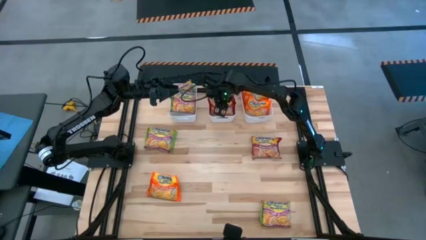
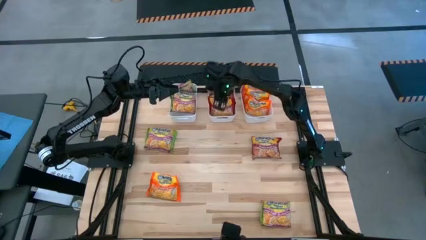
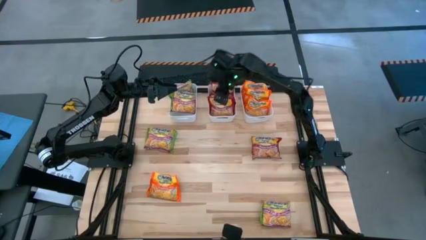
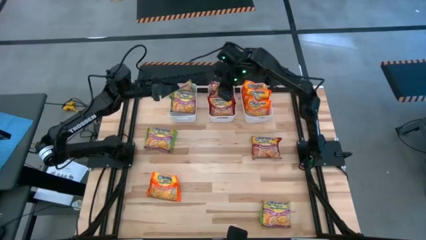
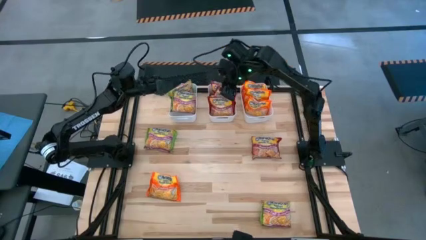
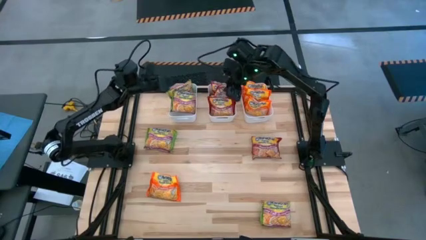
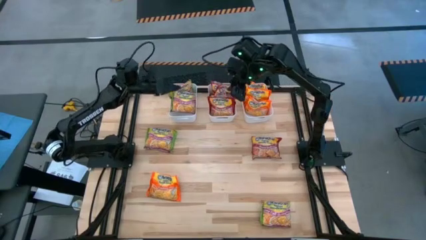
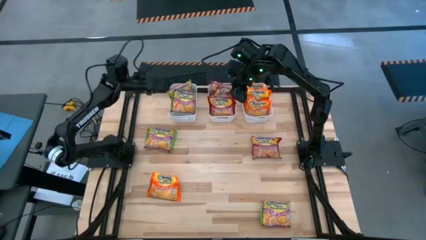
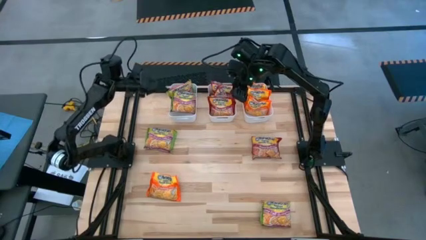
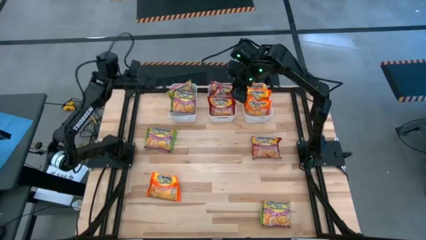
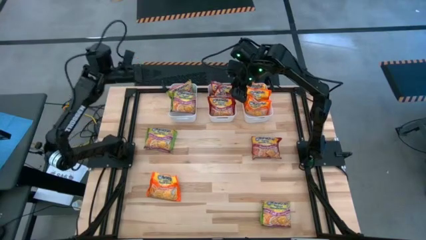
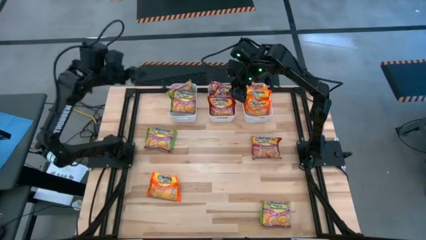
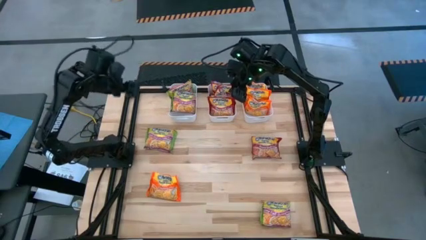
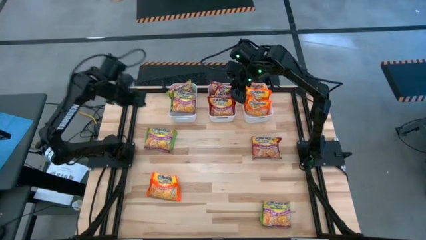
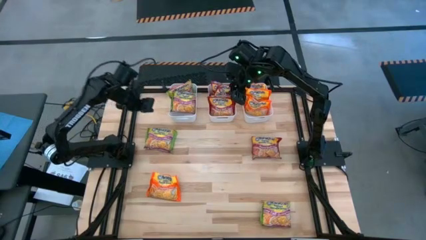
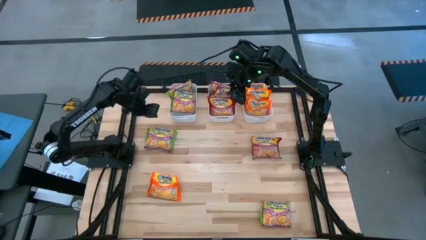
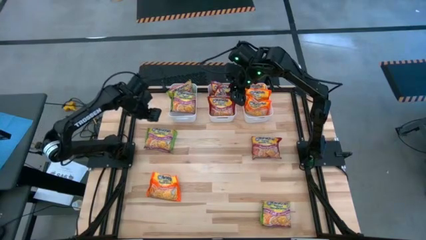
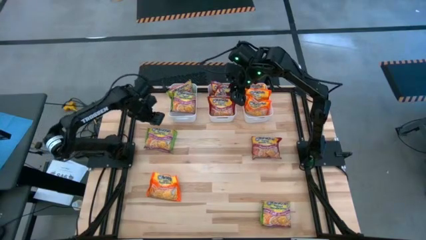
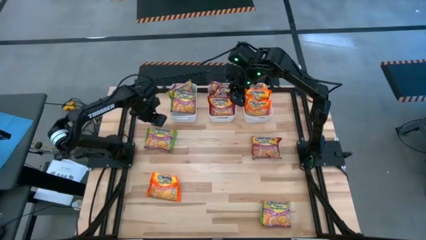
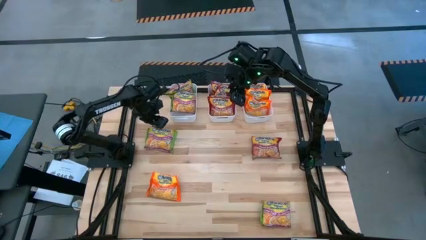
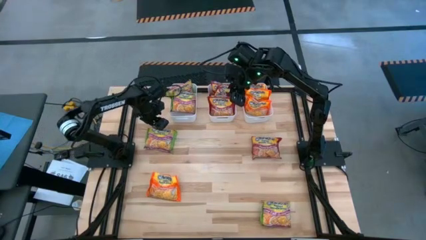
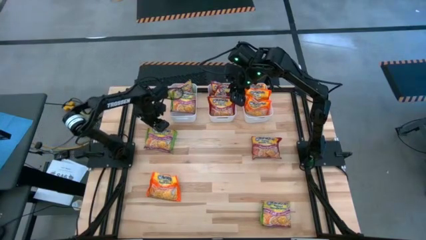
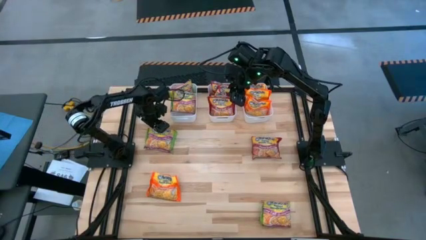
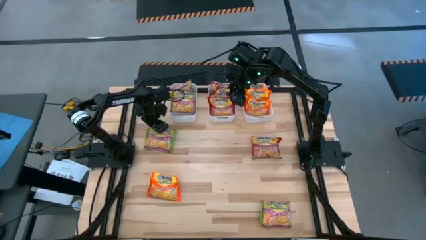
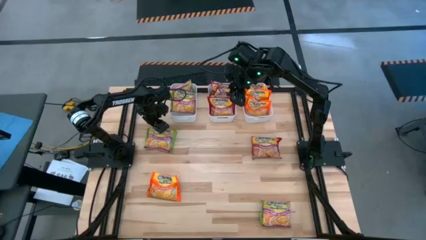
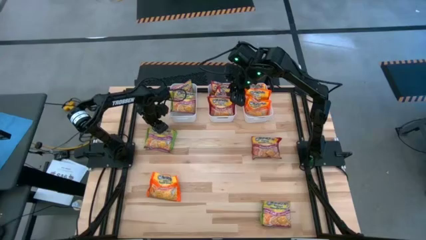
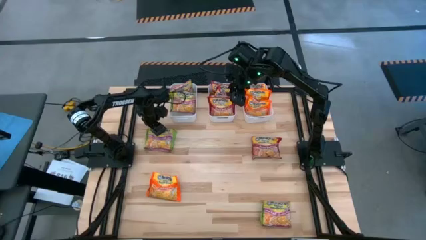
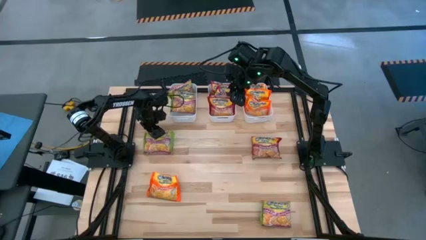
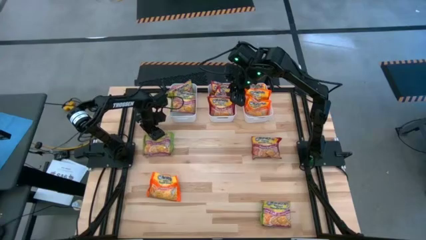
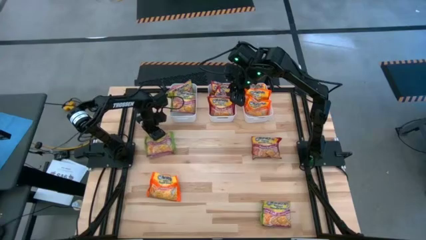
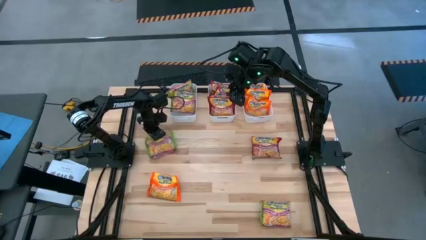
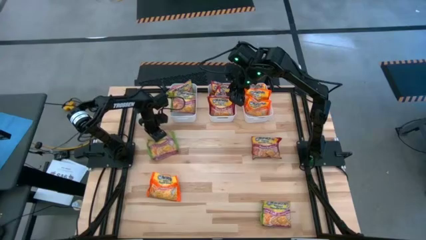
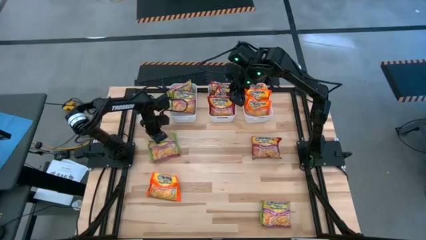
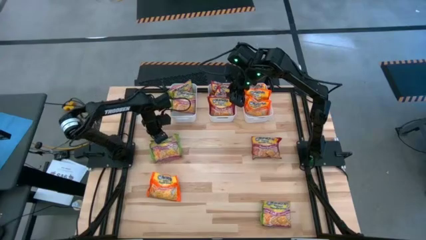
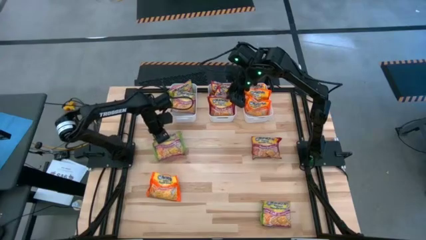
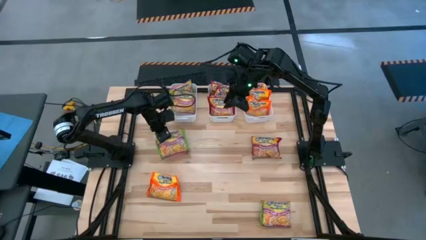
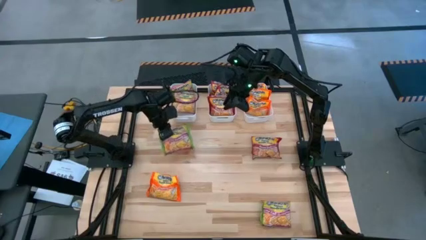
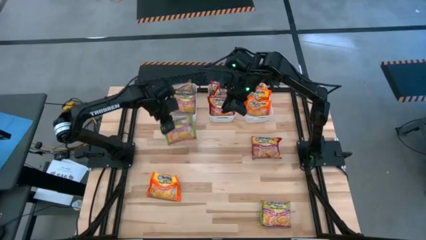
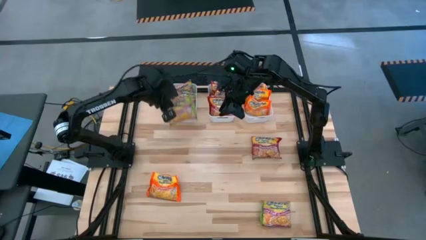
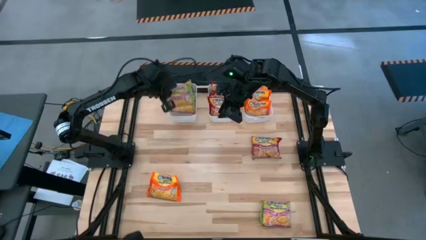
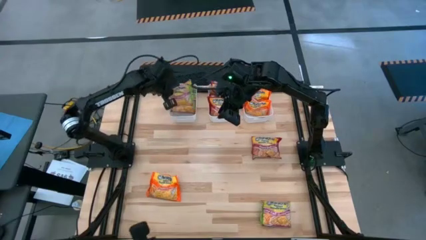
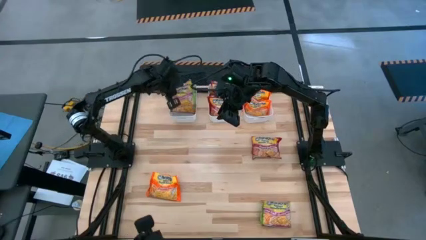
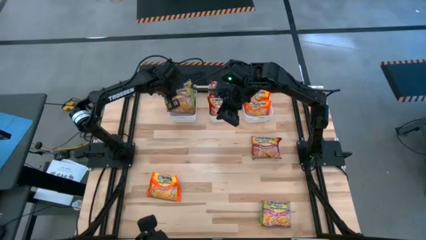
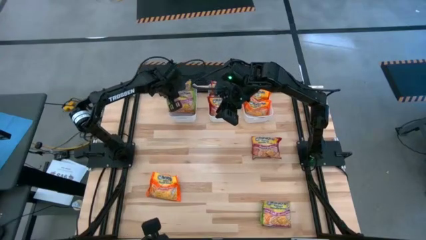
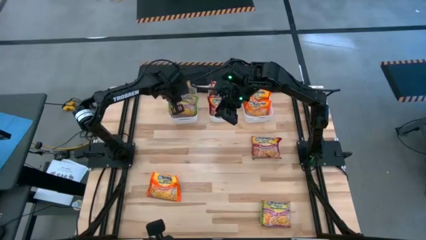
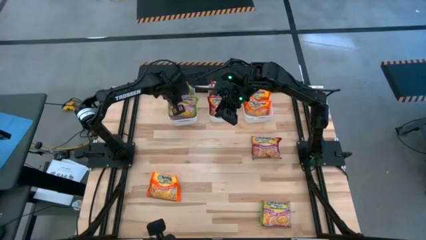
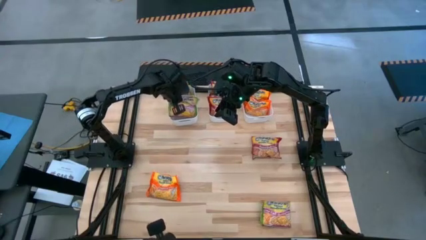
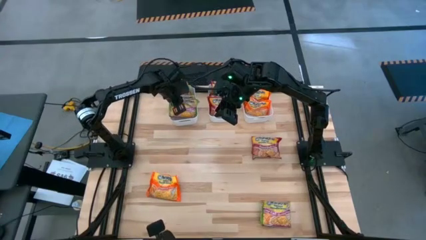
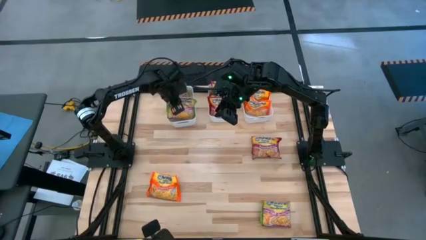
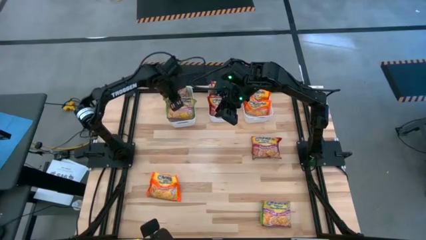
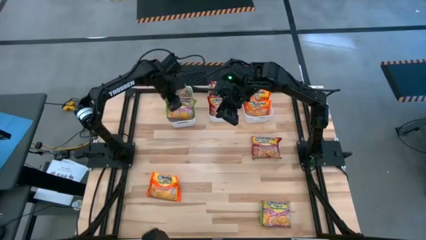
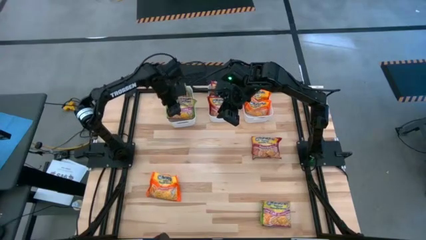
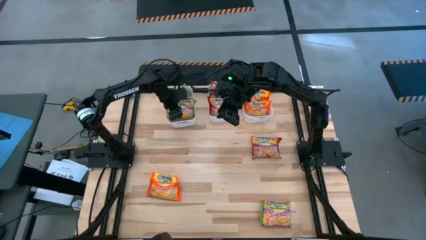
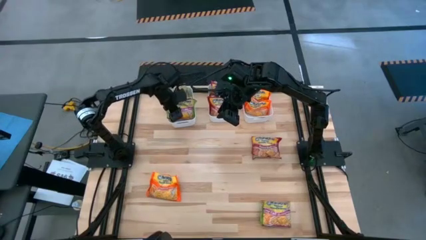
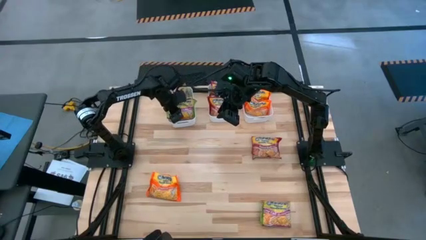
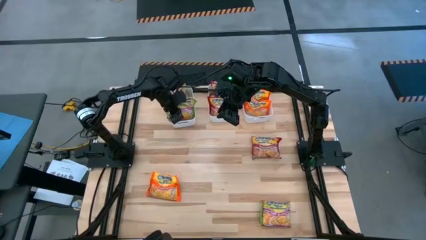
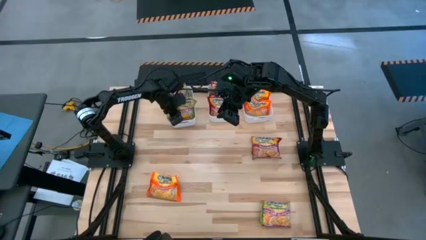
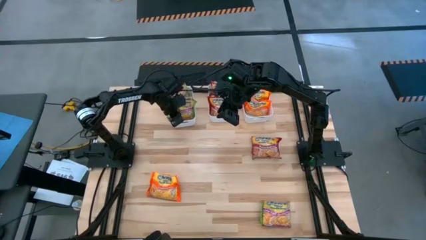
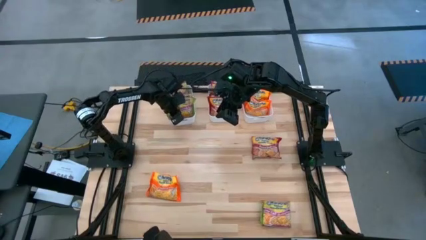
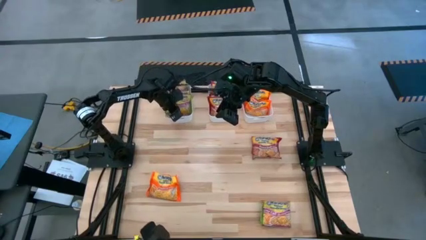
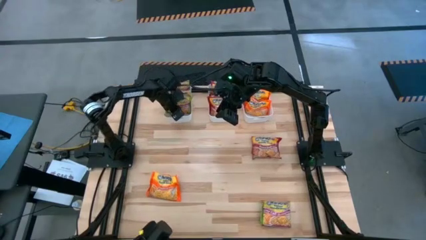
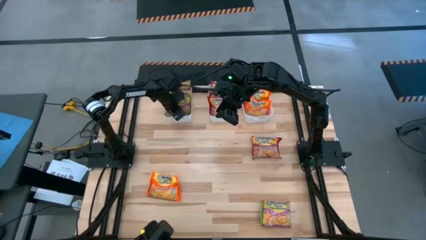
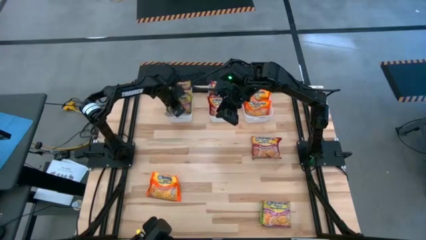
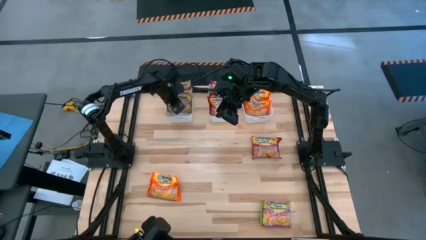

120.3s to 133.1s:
Task: Sort Maruchan noodles
Put the green noodle pack into the left white bin

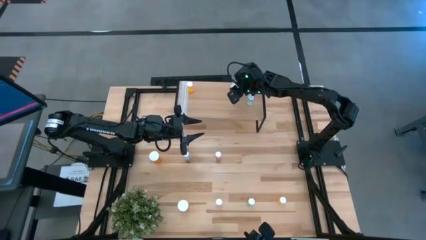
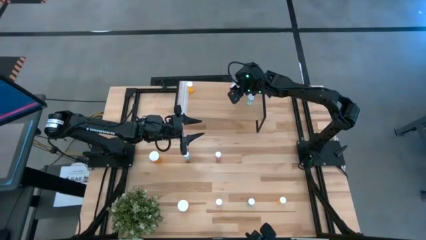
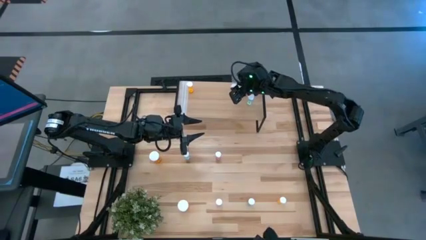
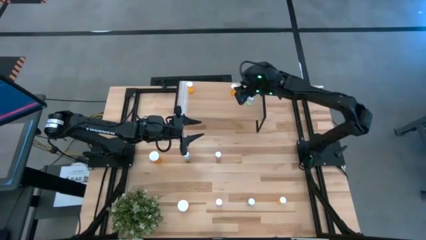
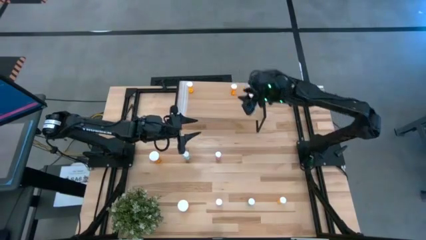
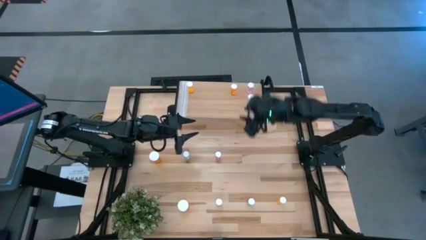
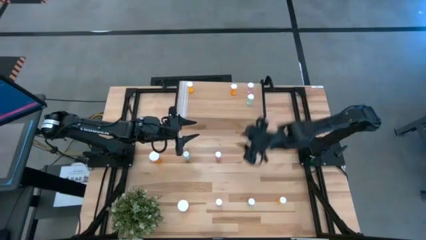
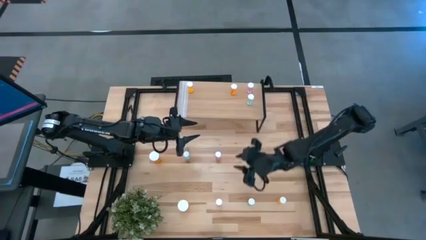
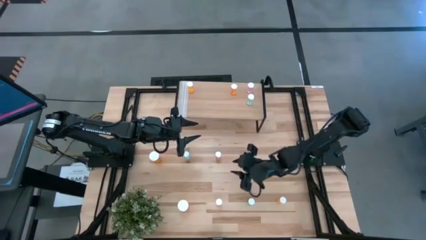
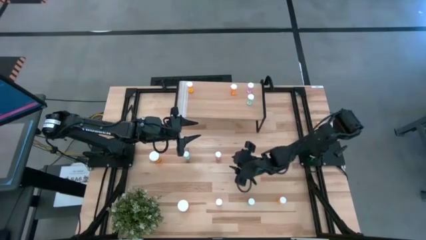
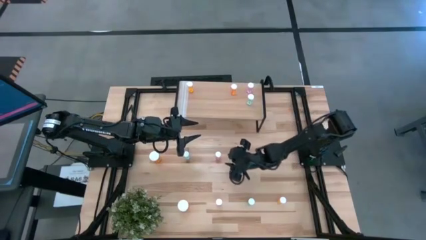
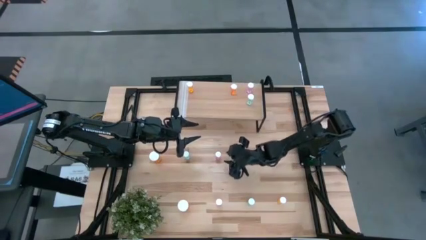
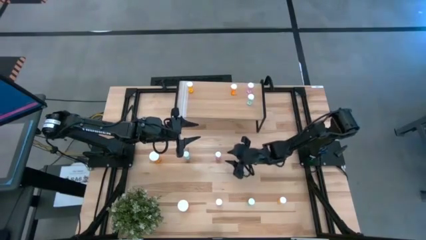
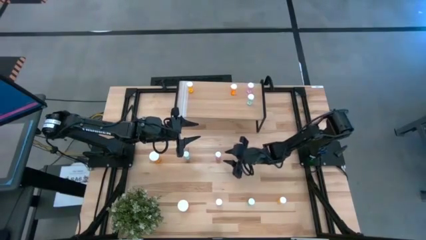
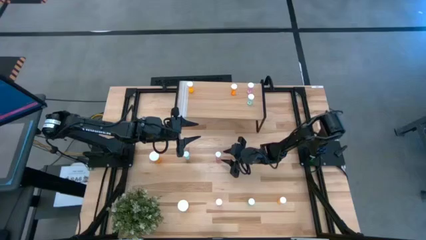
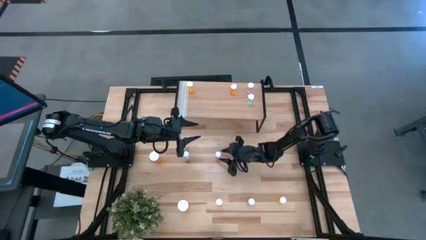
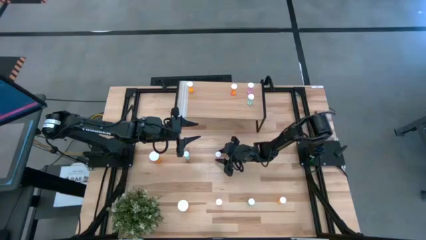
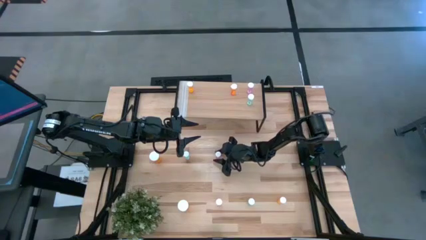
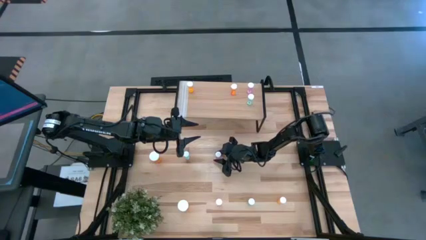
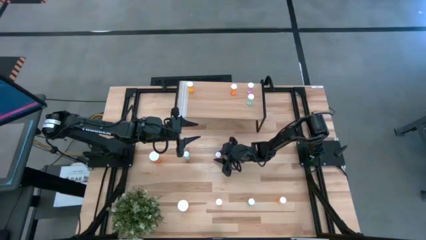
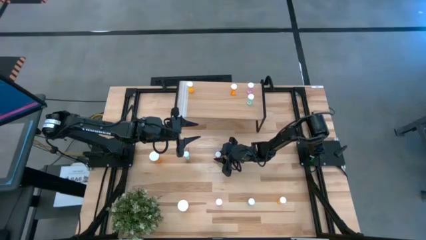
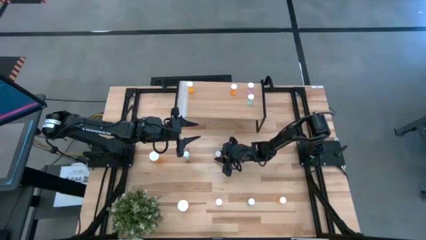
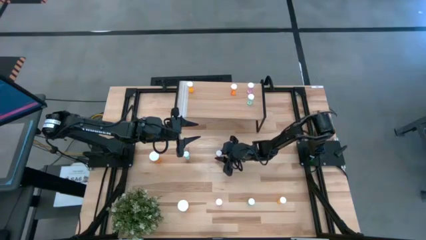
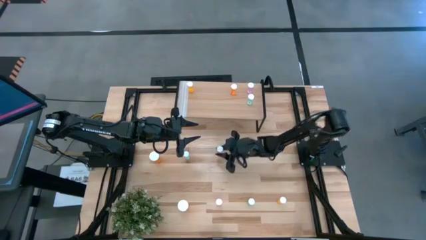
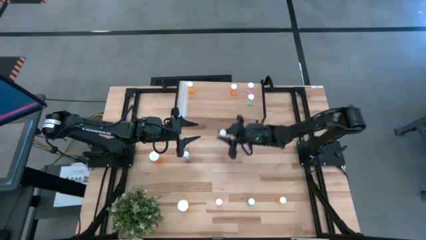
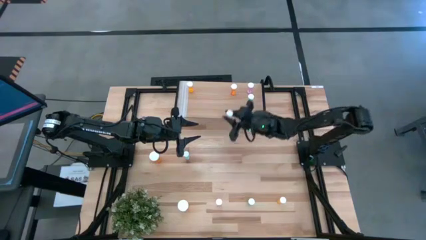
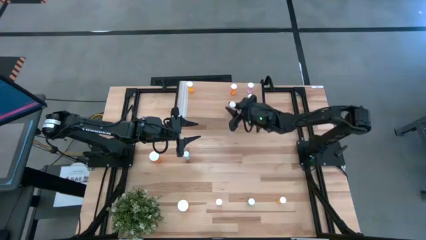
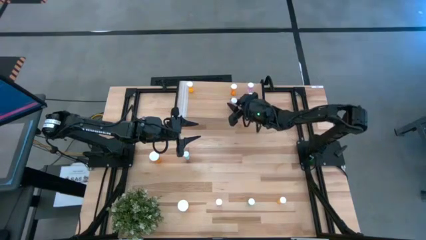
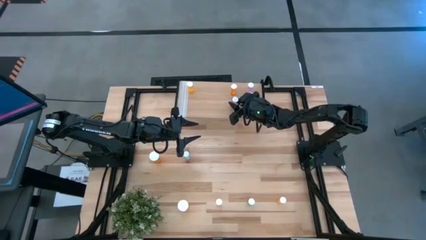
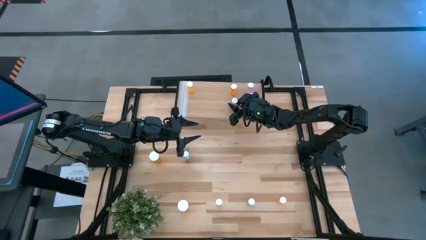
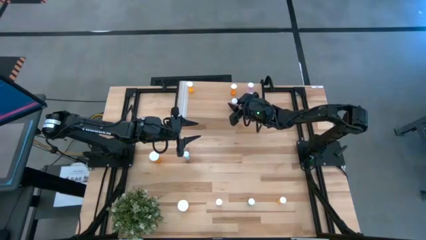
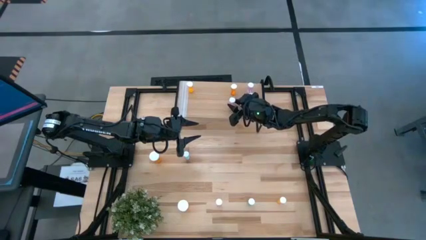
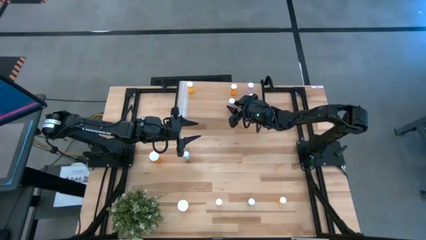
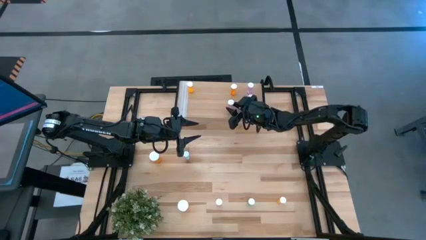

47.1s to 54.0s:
Task: Pick and place medicine bottles onto shelf by color
Put the top pink small pill bottle on the shelf
